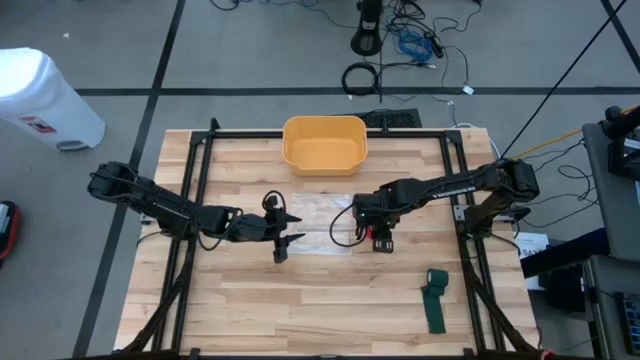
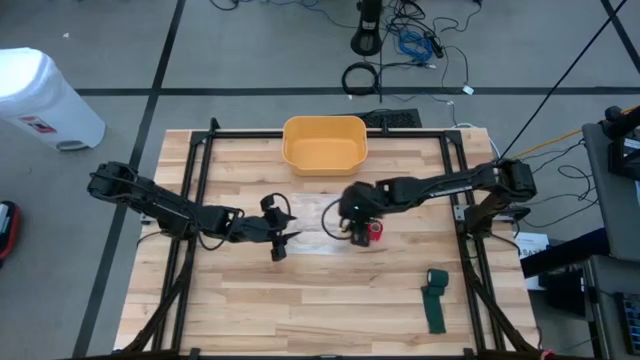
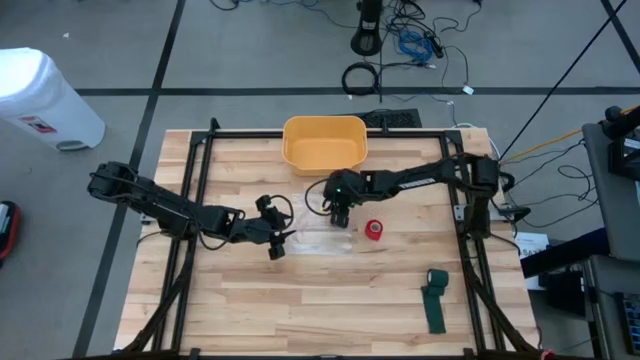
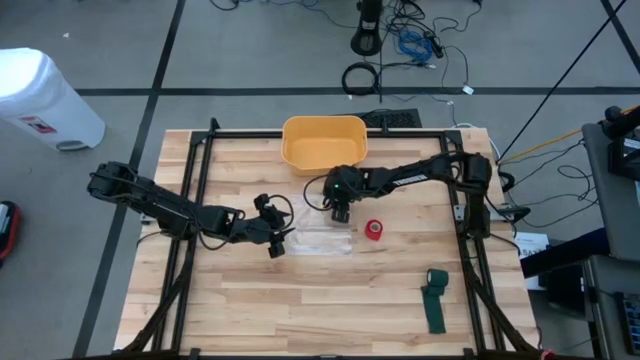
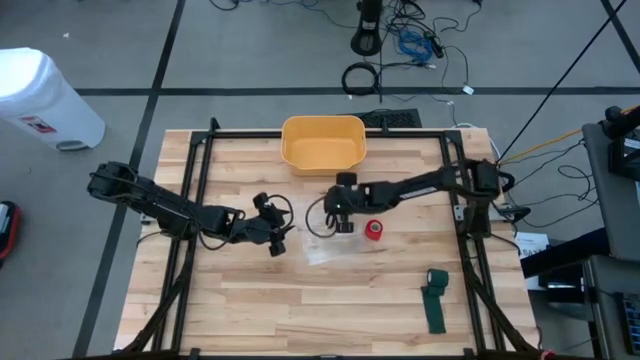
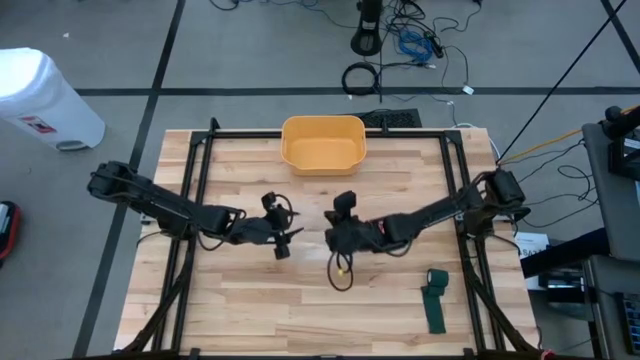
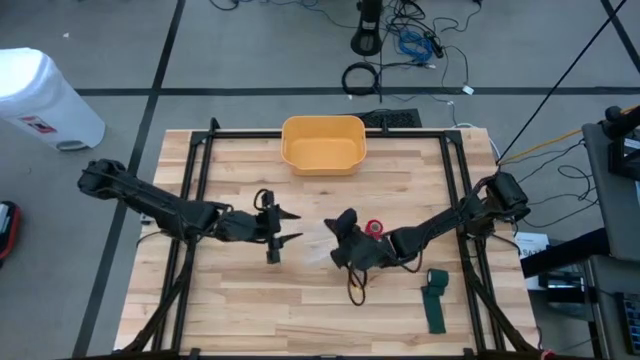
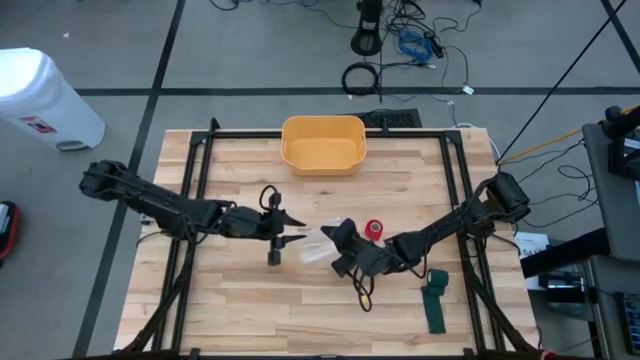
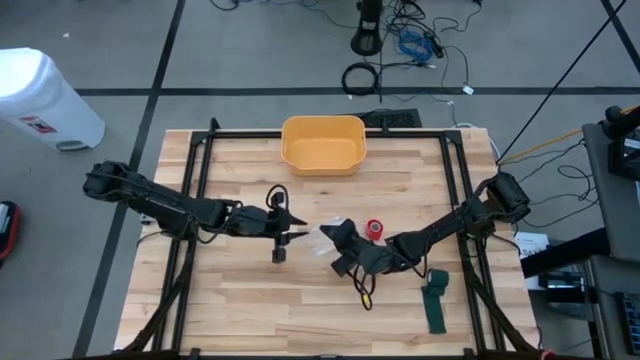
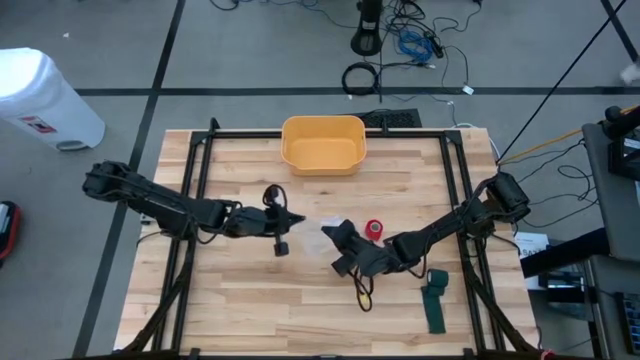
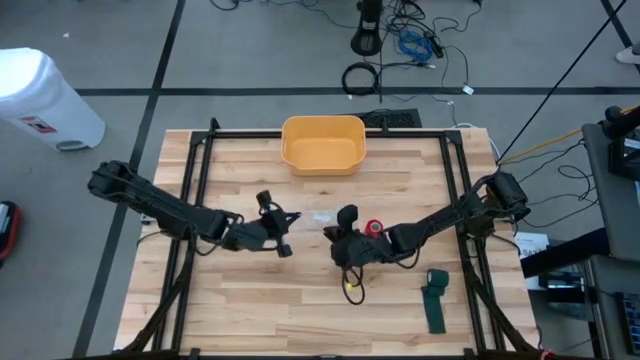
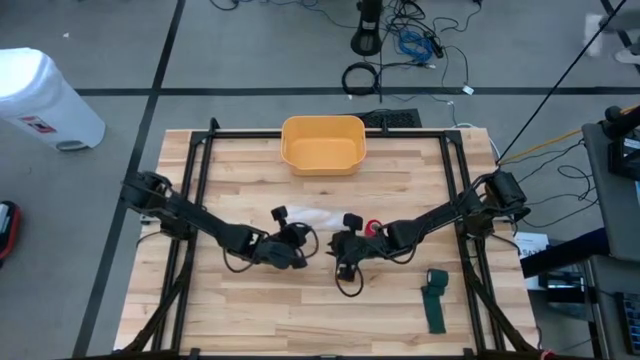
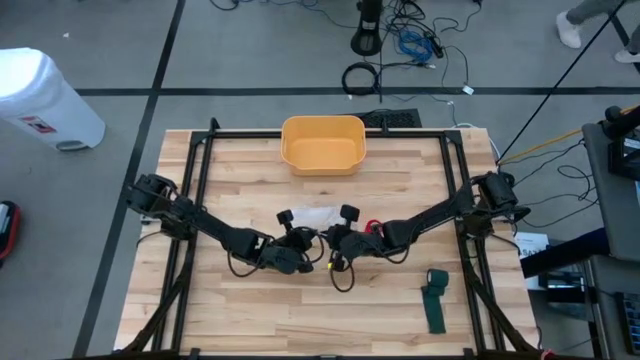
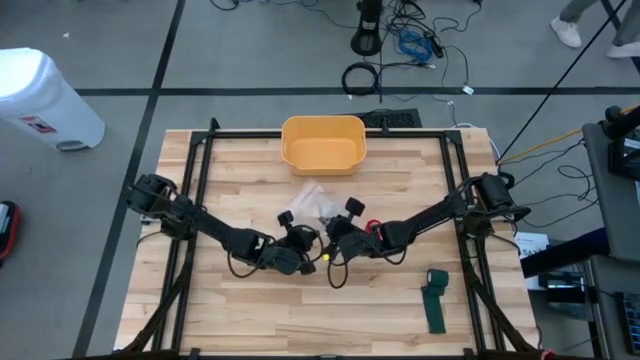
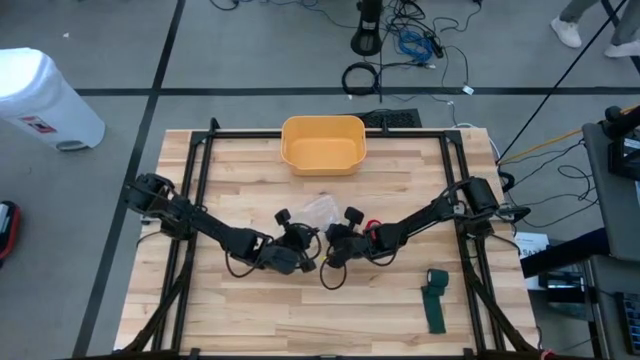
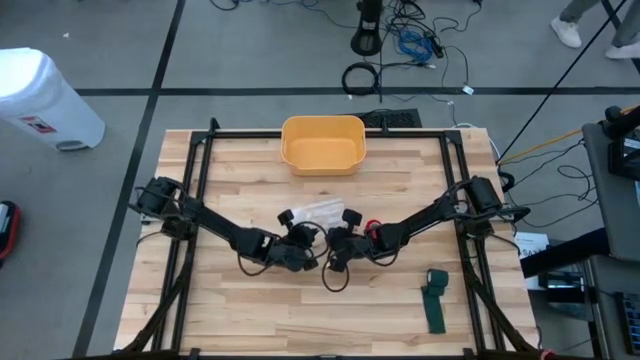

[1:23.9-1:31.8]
Task: Roll bandage
Open the transparent zip bag

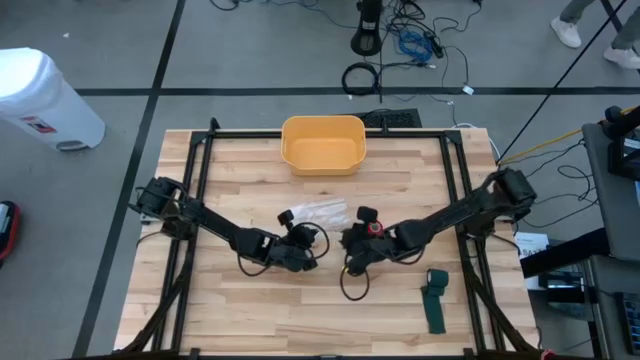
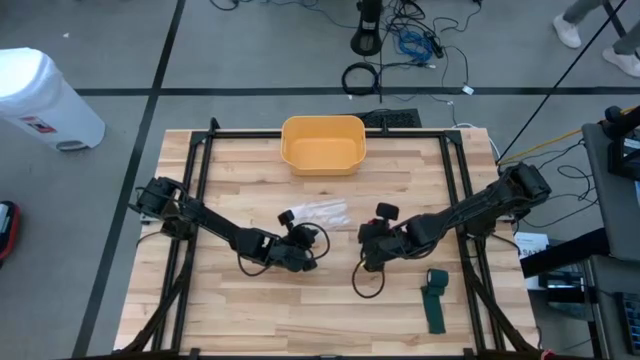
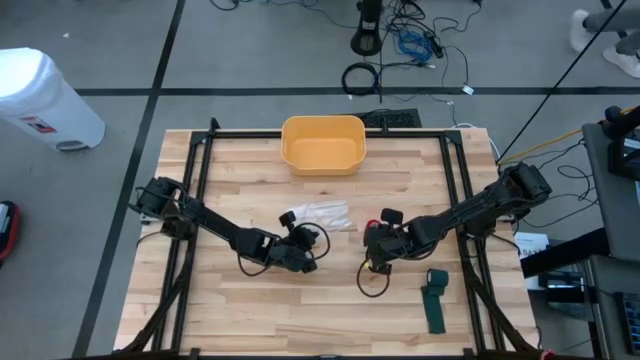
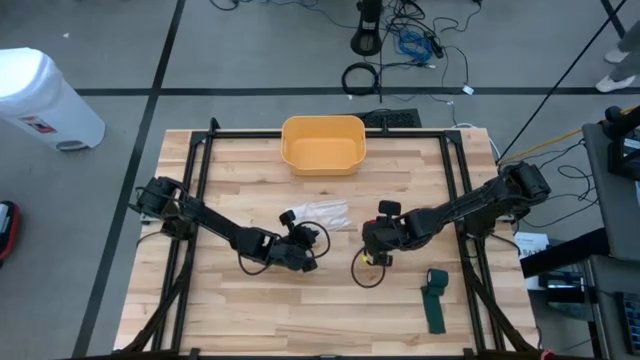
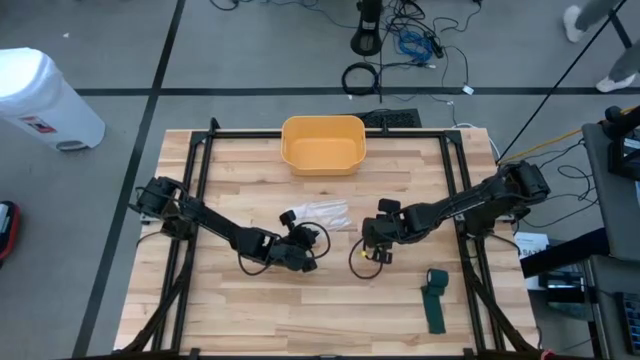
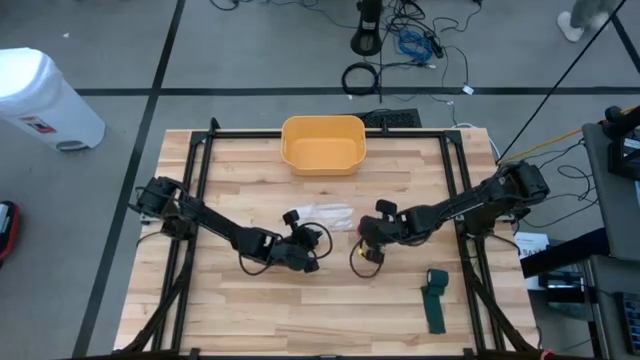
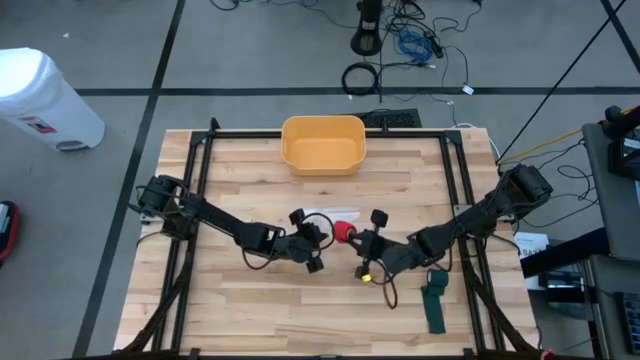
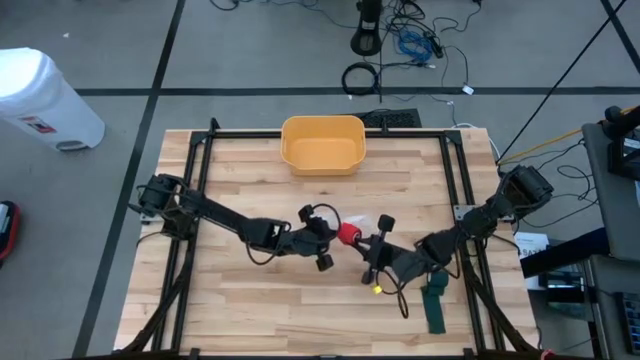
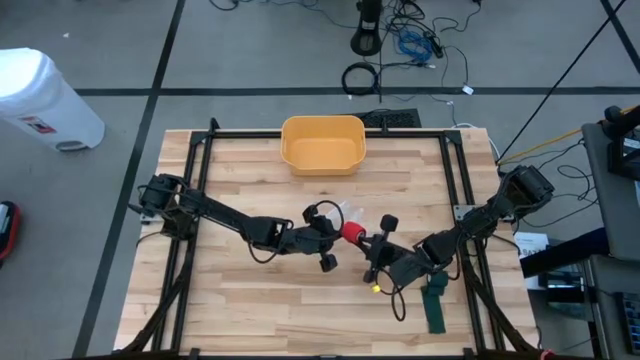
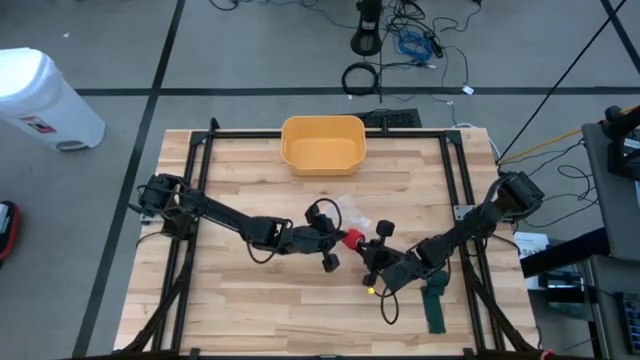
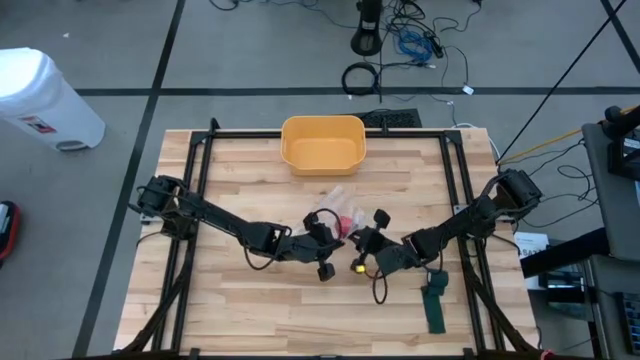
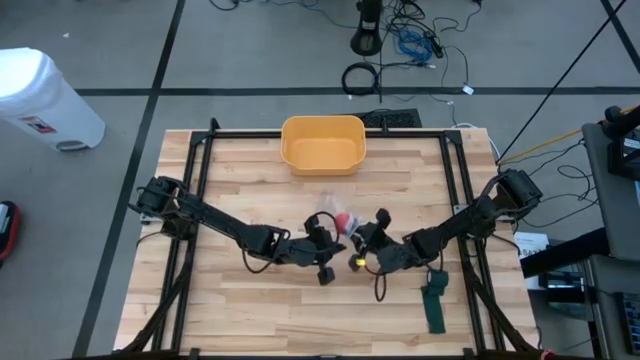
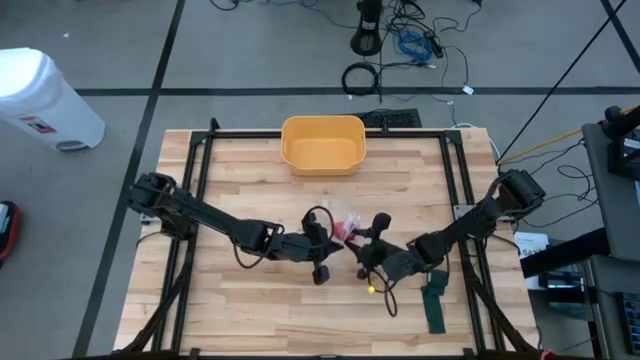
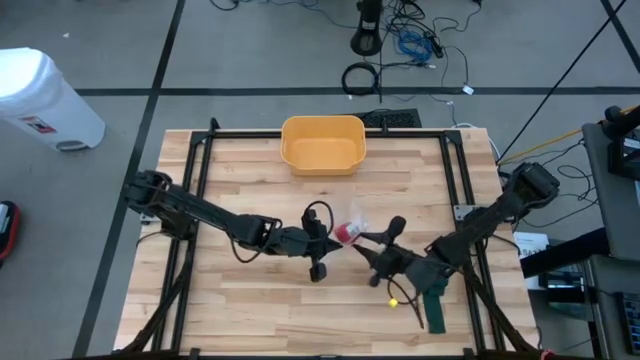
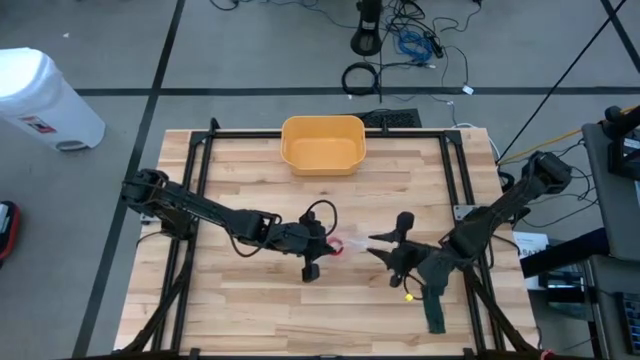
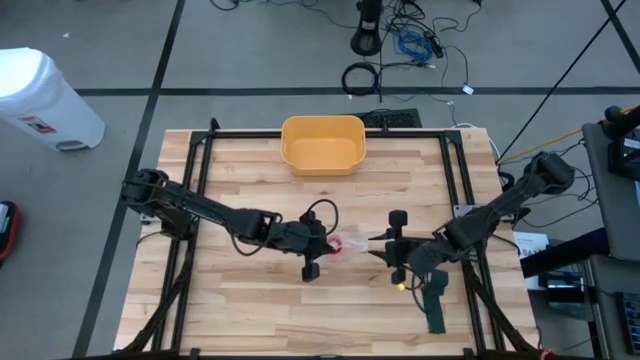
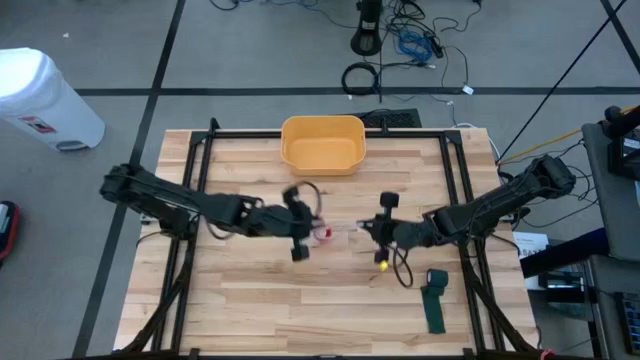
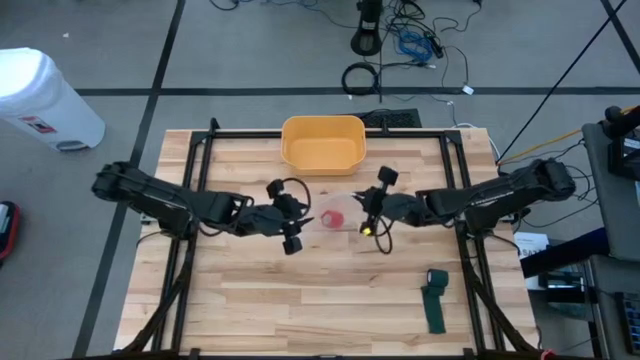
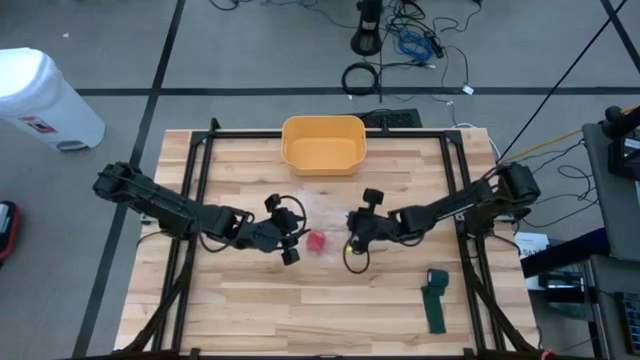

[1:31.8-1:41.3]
Put the rolled red bandage into the transparent zip bag

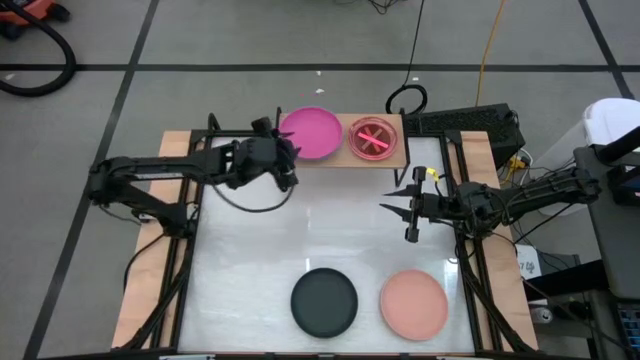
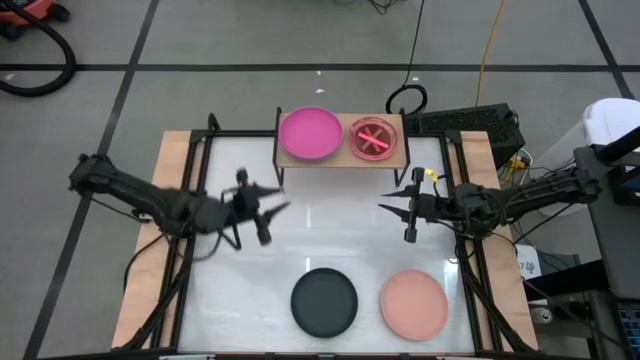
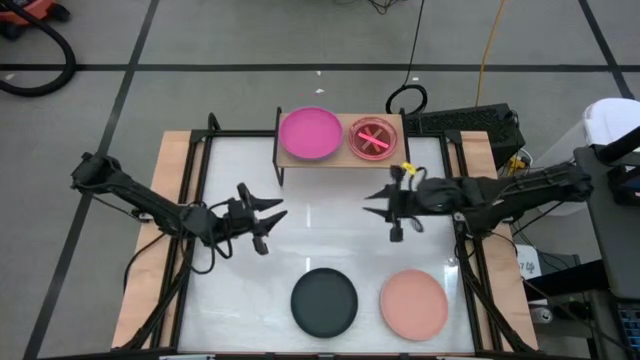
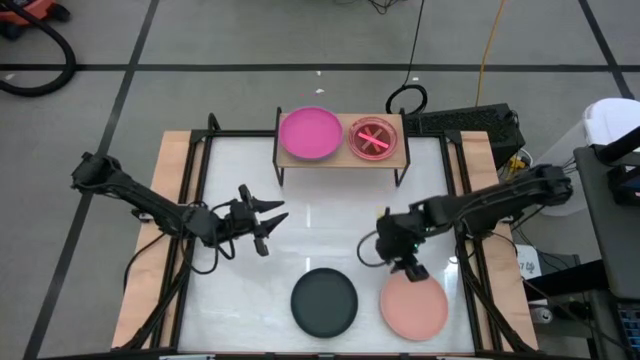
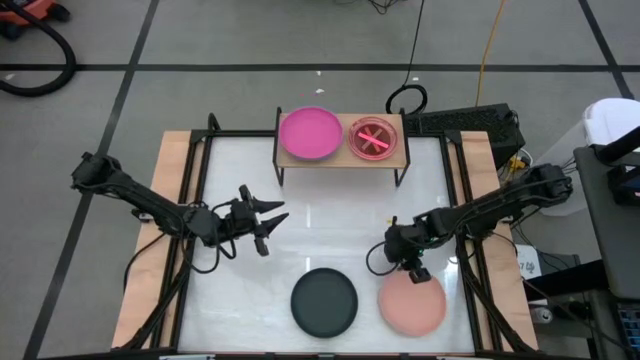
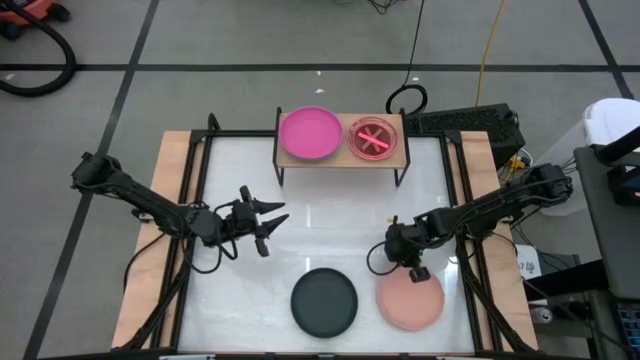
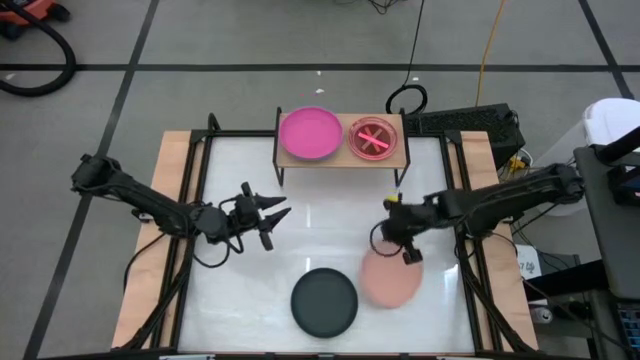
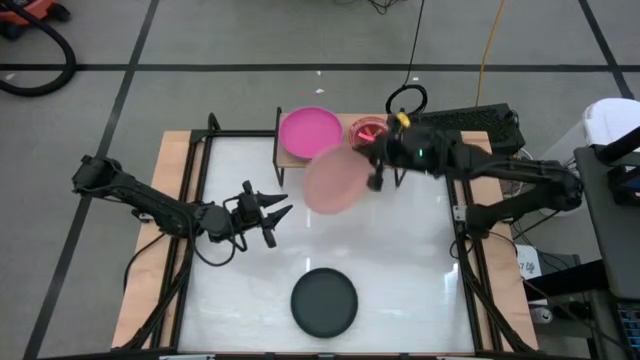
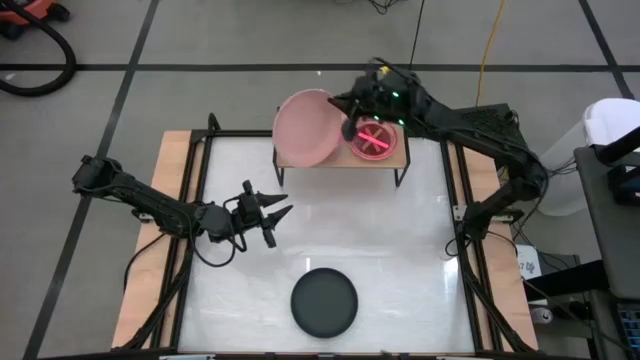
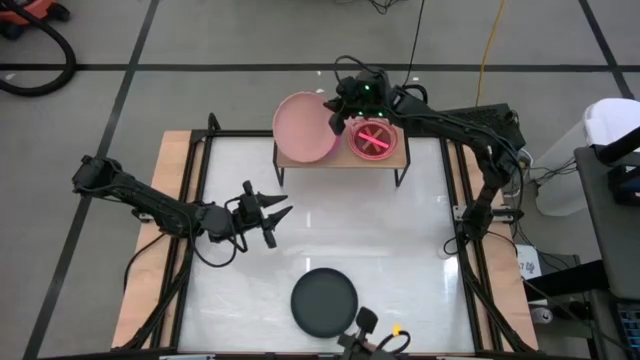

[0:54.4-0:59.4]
Task: Place and stack plates onto a shelf
Stack the light orange plate on top of the pink plate on the shelf
